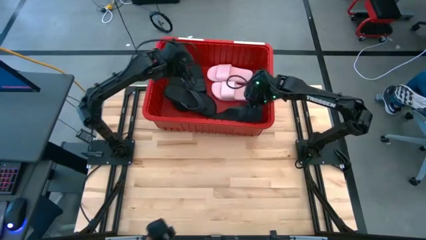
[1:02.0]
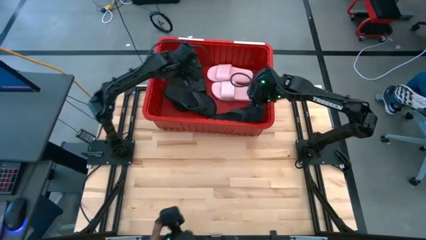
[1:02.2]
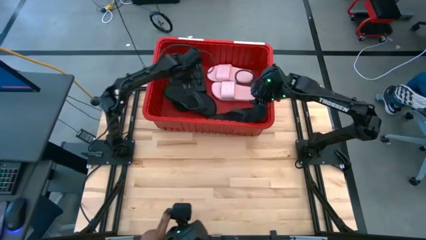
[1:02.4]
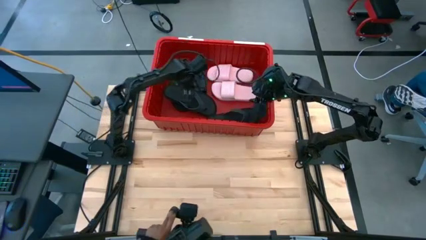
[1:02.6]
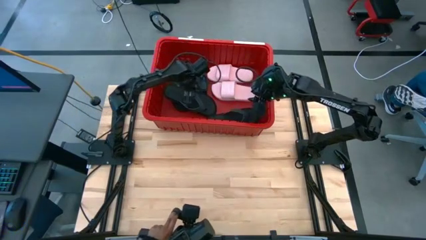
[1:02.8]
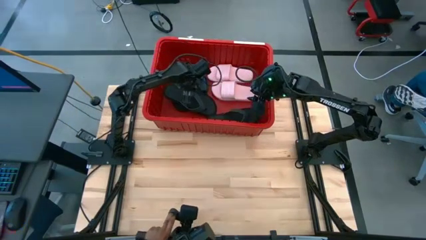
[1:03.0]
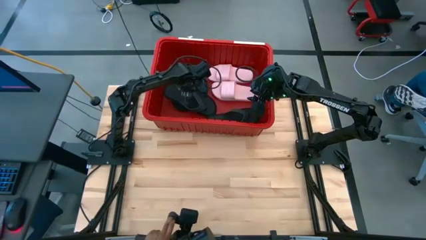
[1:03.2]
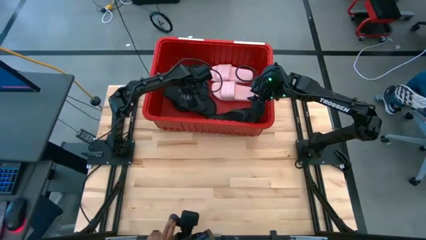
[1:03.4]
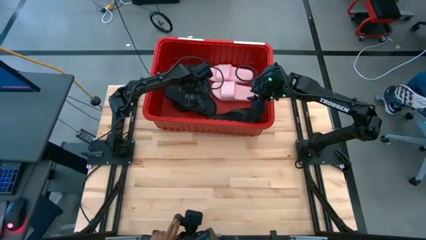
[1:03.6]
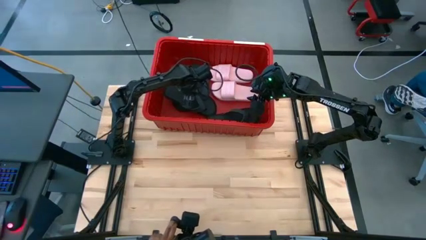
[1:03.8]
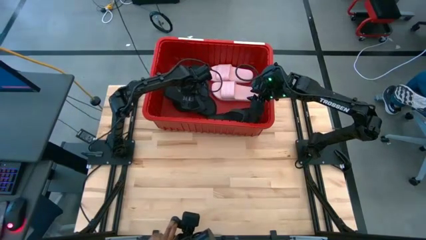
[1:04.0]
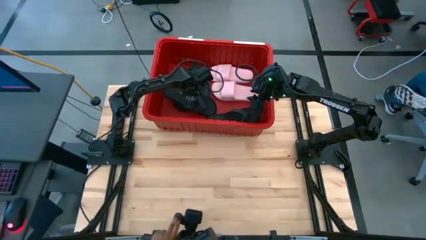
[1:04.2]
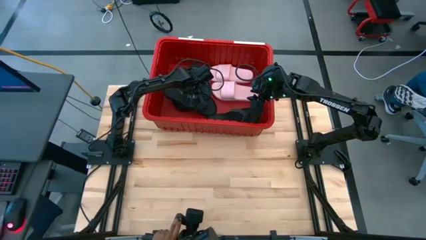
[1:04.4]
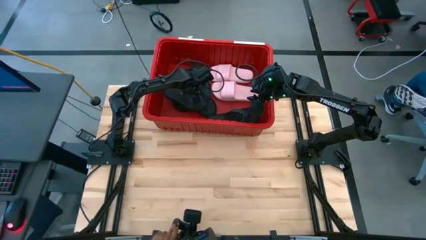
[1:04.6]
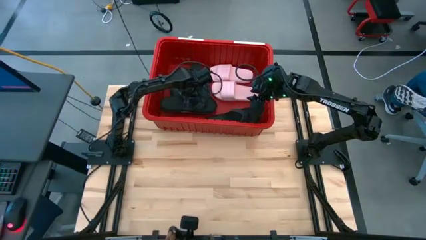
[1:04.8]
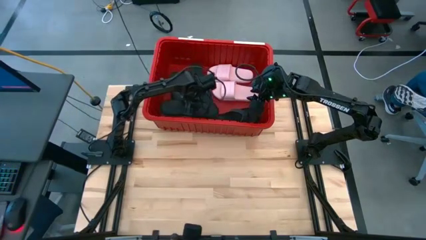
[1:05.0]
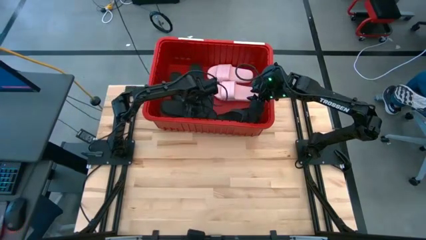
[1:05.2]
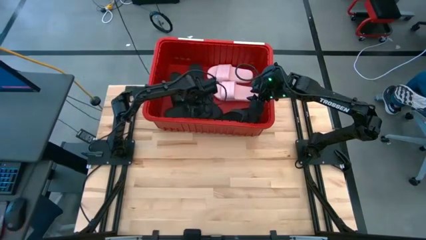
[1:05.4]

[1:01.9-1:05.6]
Task: Pick and place slides into bin
Adjust the black slipper on the red bin

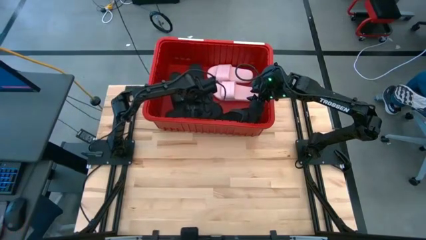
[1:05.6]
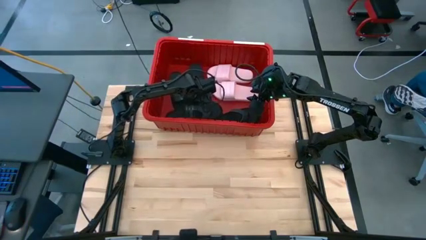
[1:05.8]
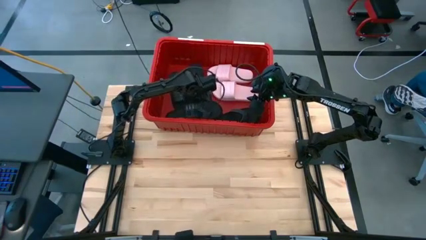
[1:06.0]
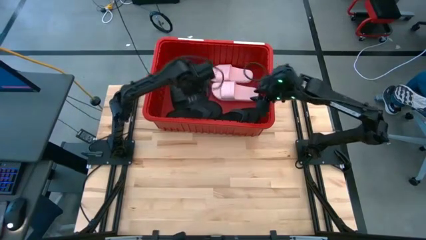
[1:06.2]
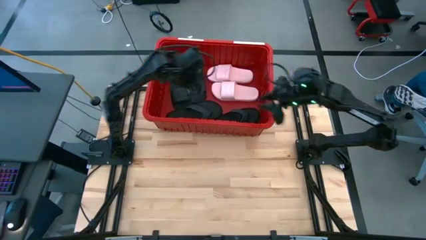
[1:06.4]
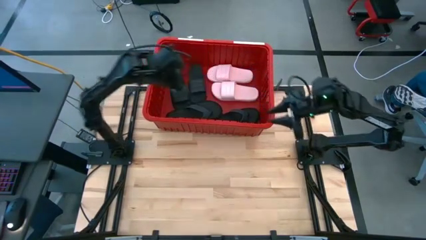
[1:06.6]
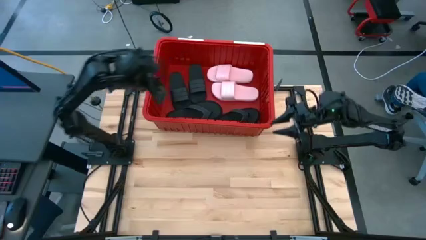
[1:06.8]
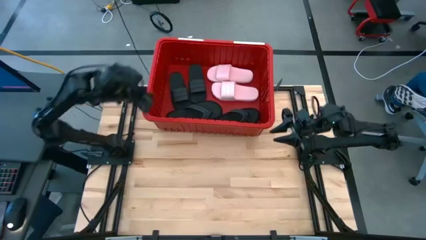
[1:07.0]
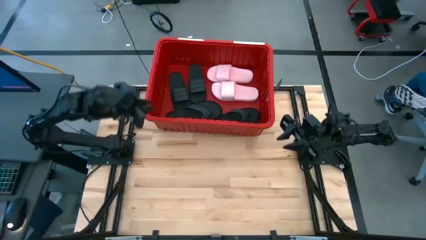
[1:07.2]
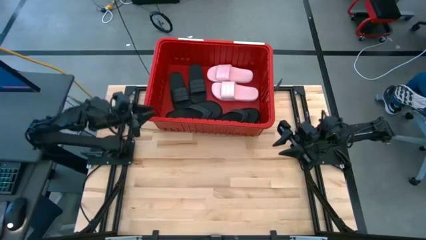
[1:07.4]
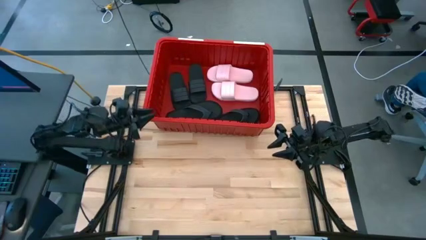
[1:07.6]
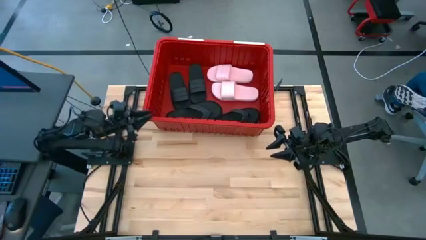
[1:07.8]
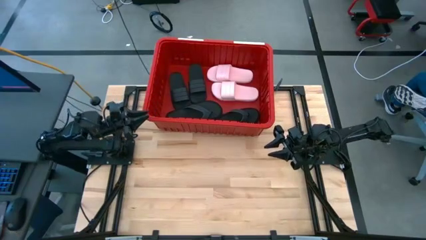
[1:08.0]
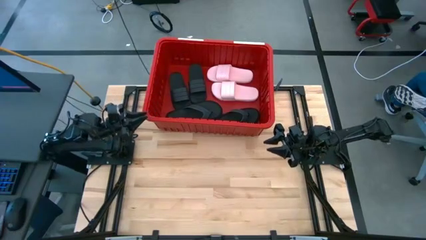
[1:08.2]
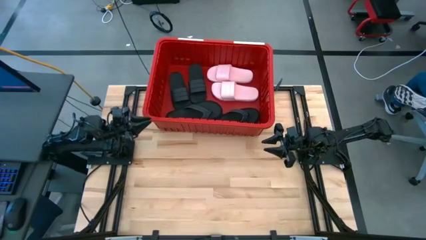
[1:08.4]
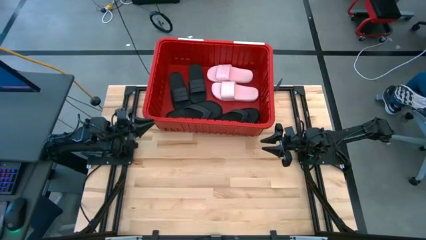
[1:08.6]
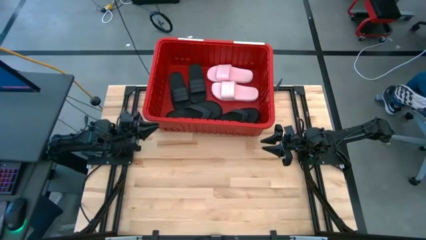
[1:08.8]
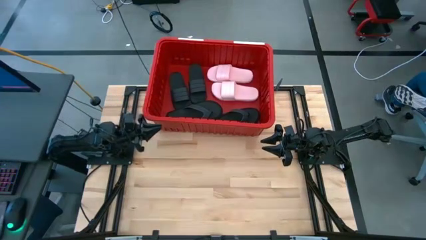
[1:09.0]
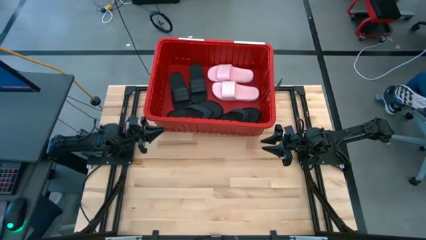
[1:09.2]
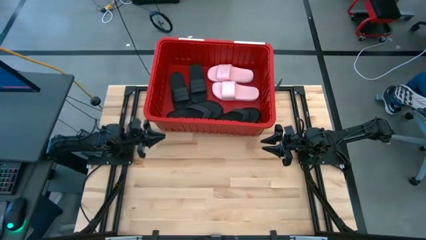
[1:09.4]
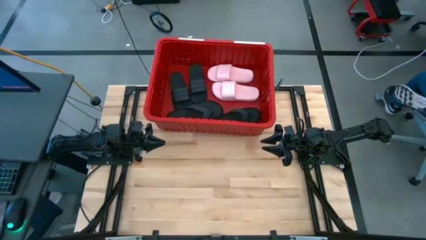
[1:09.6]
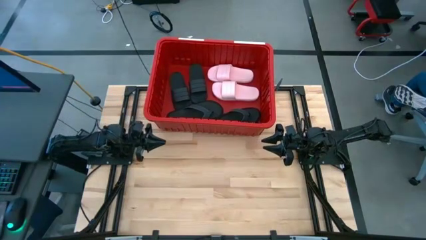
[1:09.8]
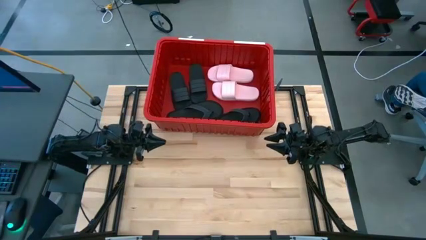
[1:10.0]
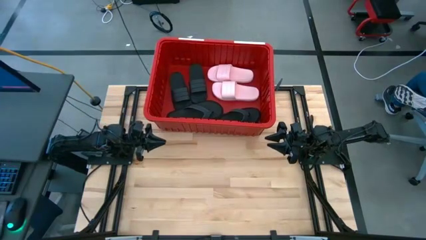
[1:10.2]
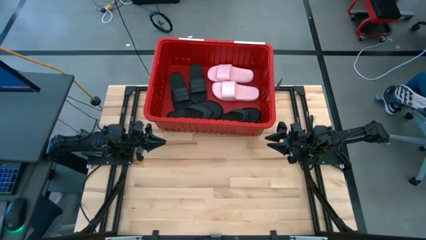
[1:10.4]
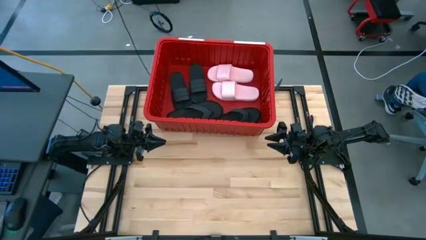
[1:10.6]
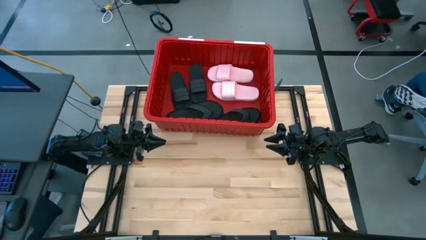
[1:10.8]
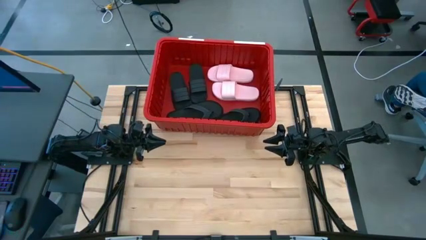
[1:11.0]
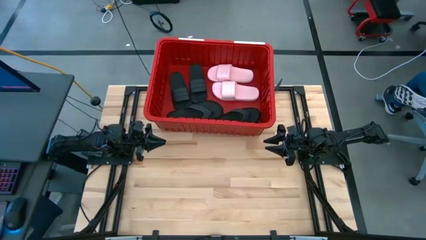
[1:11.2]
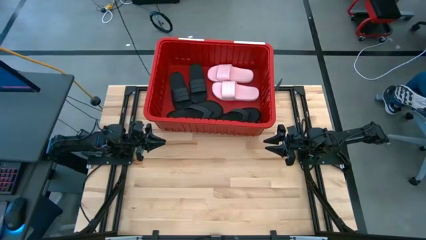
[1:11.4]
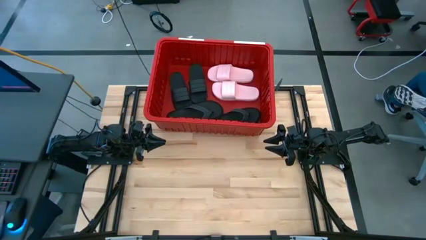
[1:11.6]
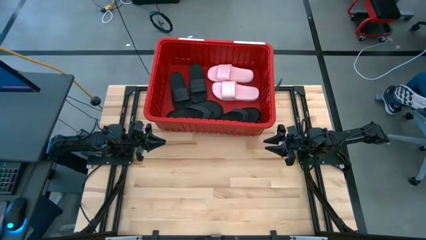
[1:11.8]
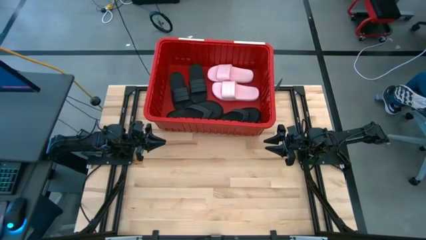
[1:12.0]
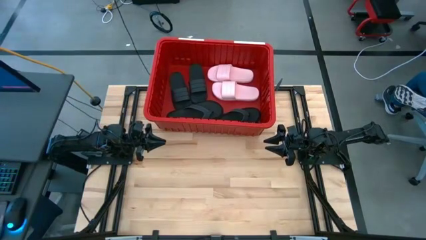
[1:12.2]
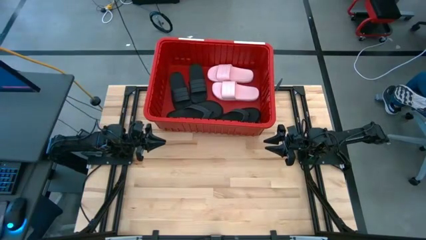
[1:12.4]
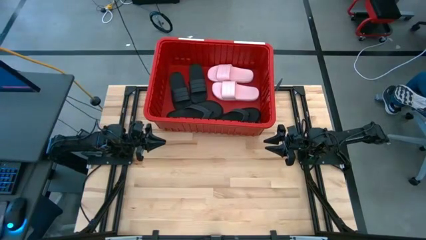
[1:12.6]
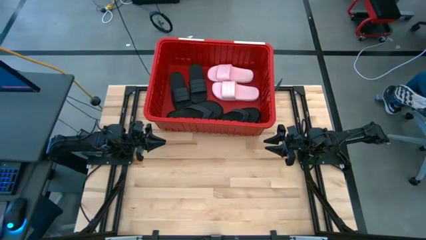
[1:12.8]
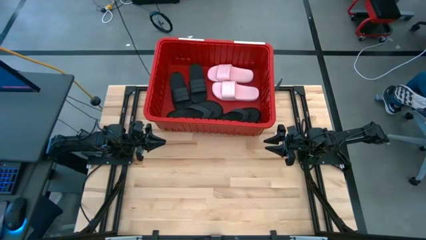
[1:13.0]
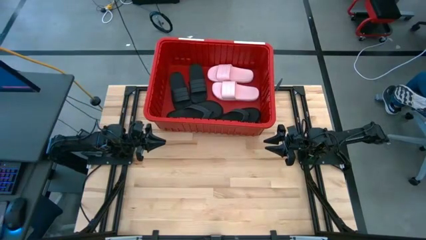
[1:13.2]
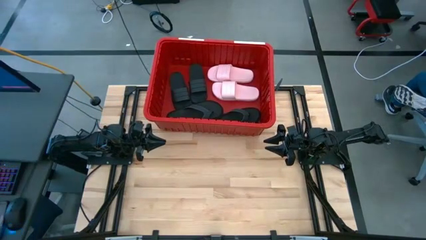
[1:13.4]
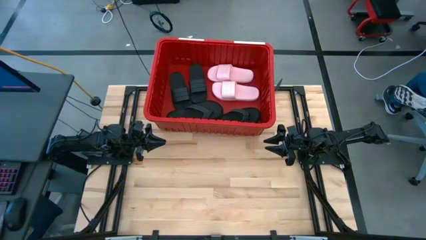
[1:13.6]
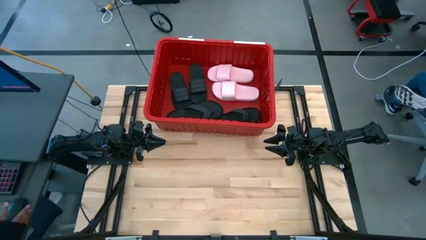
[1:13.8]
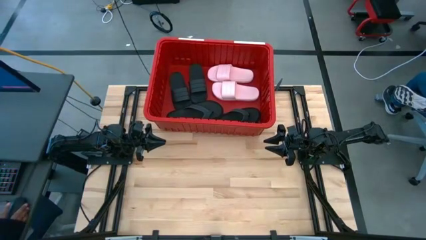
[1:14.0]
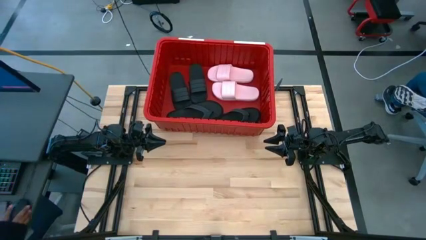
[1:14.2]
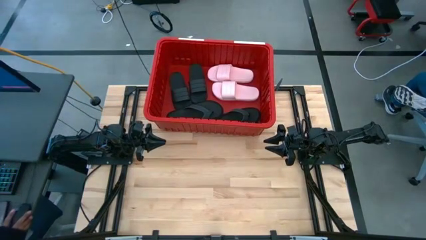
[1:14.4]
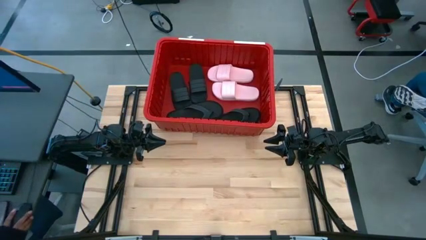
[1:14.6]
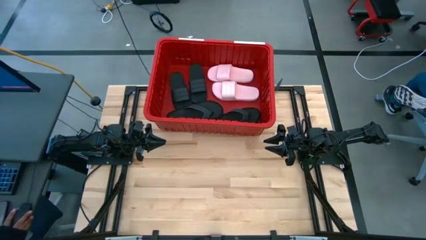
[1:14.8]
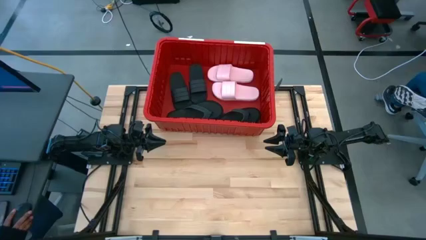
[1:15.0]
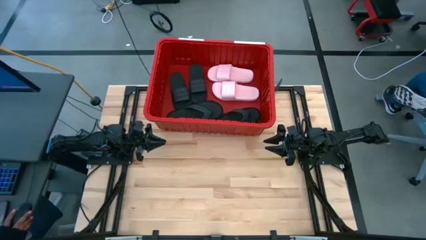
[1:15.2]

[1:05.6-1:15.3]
Return to Home Position

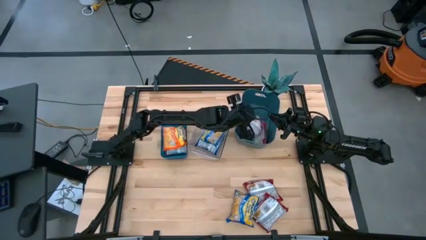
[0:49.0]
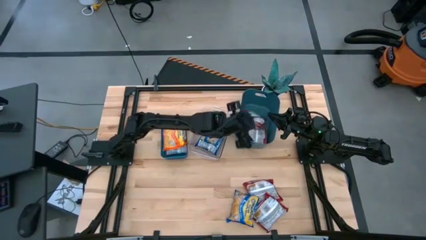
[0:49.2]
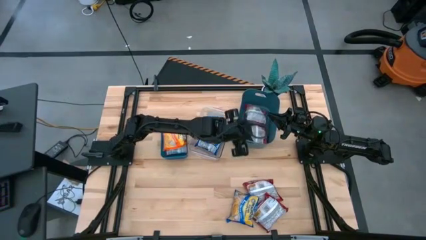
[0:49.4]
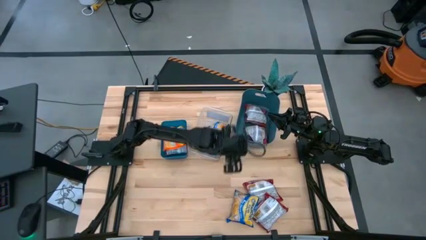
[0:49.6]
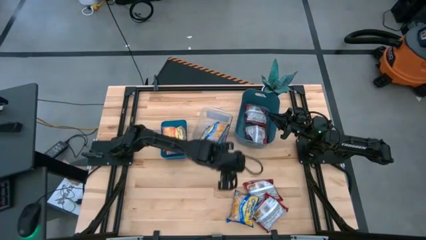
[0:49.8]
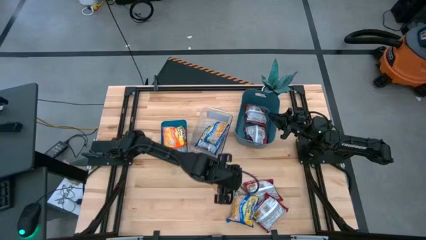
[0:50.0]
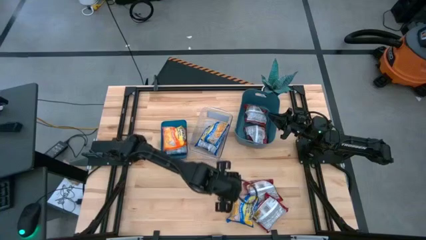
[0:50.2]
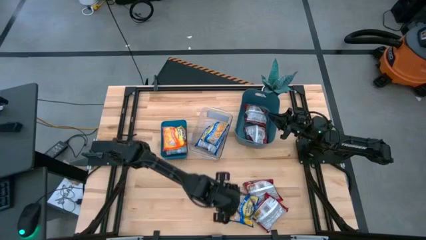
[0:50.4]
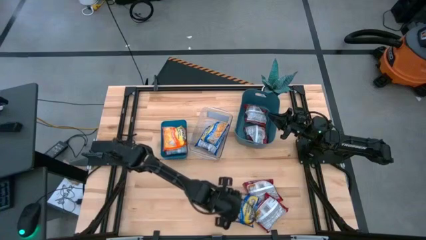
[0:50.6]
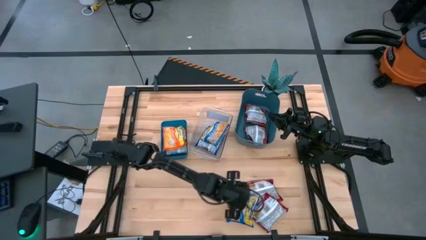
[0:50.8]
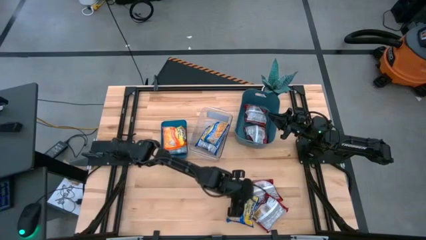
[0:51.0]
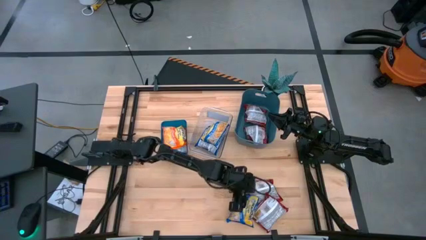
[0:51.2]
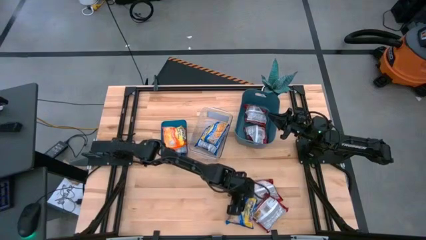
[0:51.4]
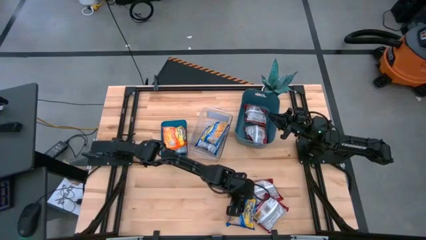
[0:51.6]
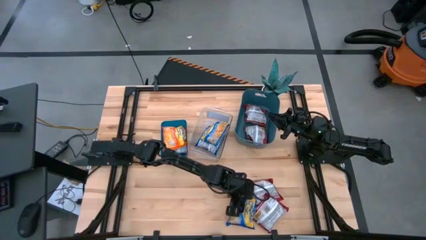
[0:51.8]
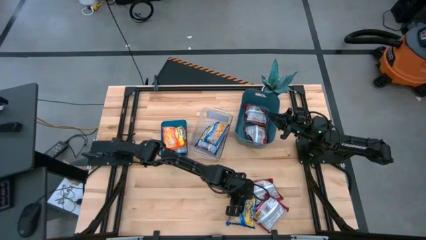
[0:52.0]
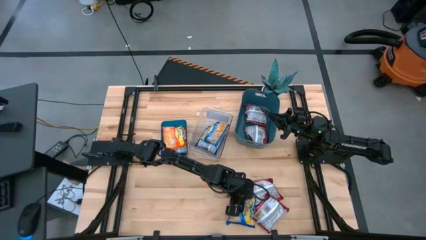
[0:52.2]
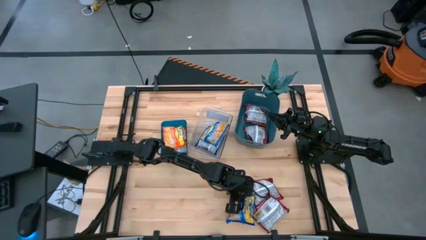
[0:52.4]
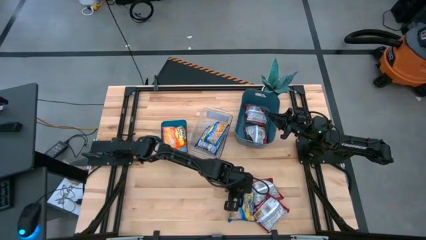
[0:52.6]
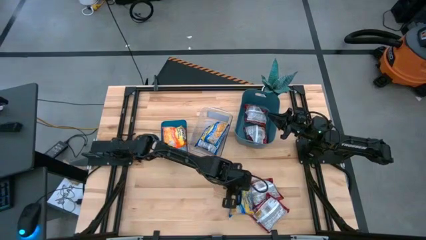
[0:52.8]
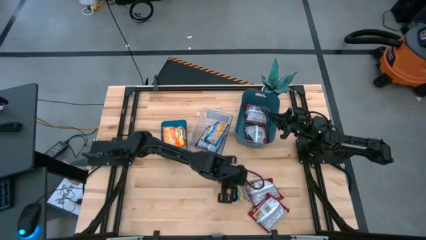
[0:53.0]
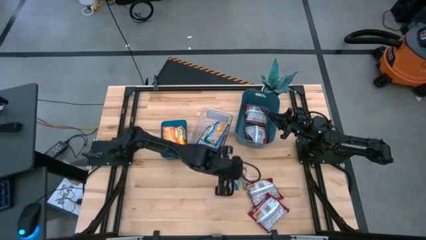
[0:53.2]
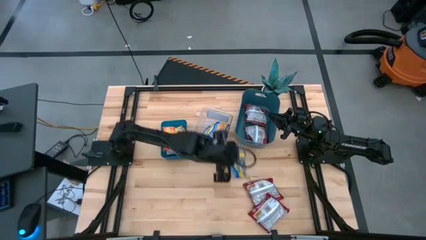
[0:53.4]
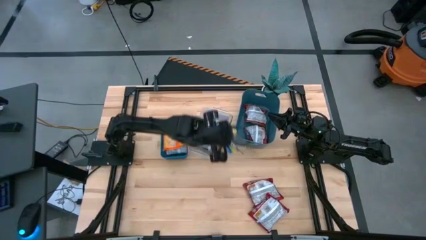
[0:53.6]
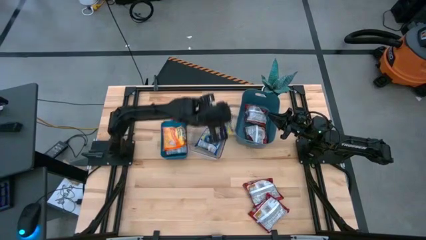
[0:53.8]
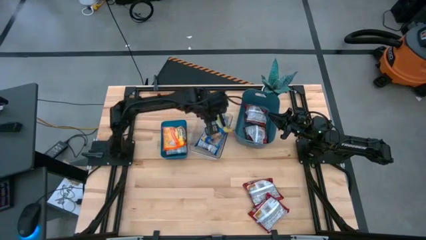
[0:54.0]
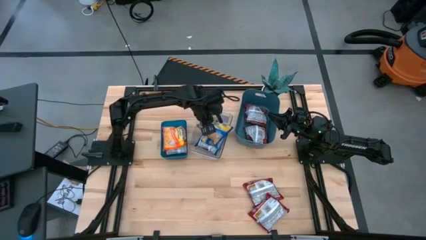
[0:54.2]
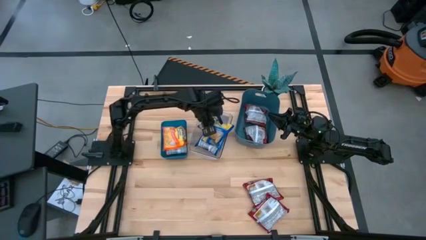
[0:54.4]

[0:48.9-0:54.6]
Task: Sort Maruchan noodles
Put the blue noodle pack into the transparent bin
